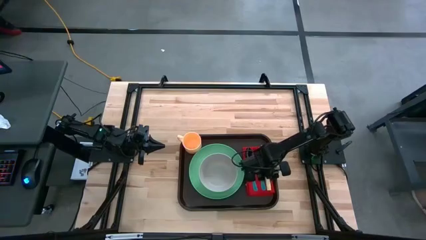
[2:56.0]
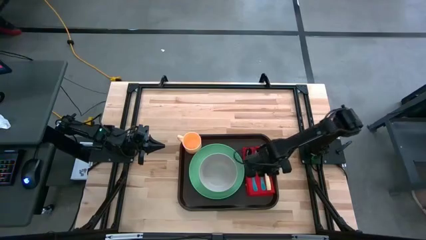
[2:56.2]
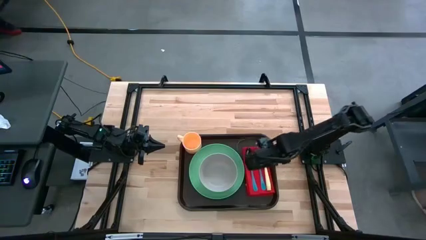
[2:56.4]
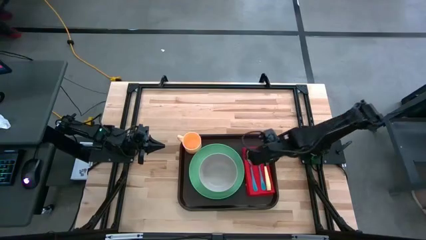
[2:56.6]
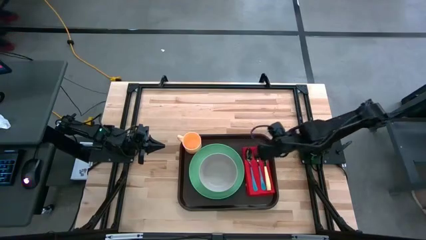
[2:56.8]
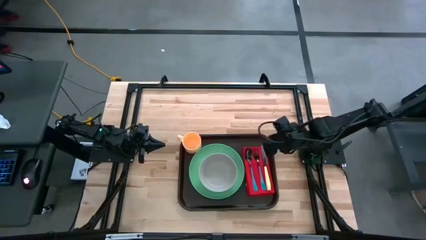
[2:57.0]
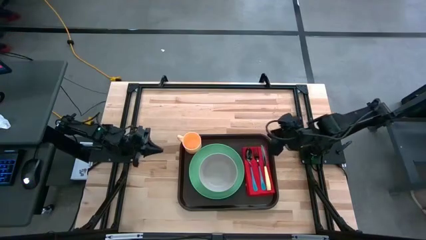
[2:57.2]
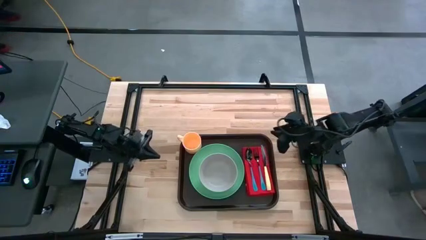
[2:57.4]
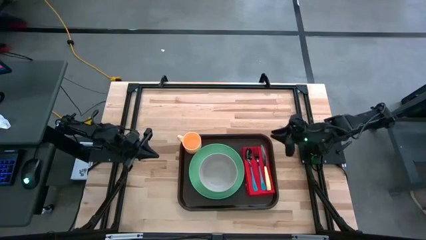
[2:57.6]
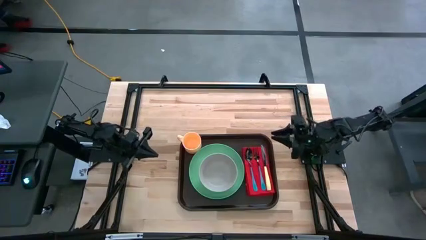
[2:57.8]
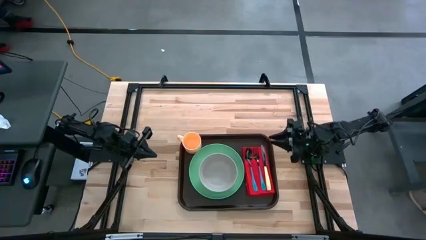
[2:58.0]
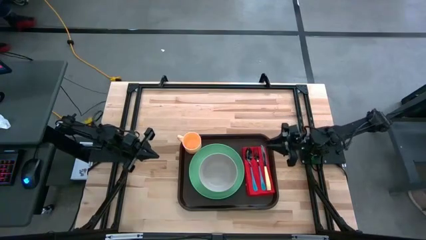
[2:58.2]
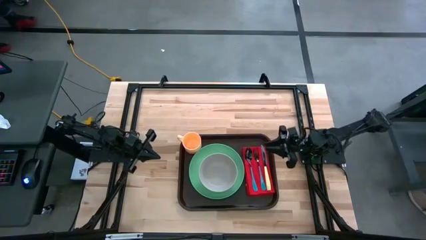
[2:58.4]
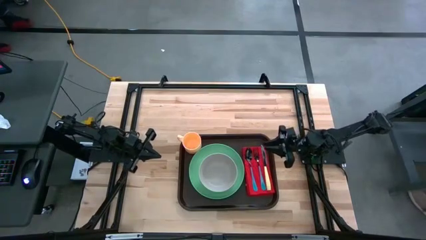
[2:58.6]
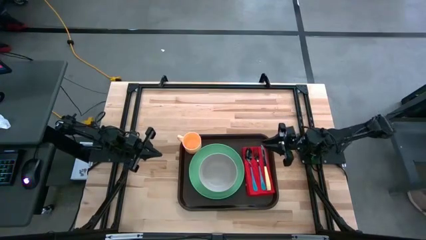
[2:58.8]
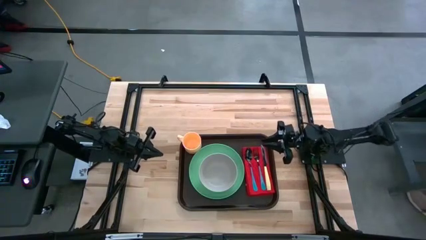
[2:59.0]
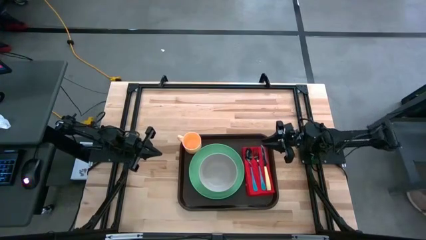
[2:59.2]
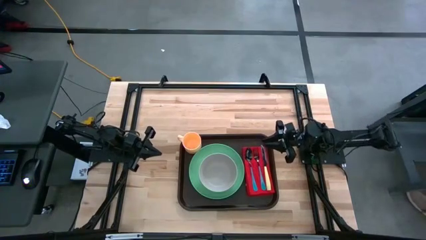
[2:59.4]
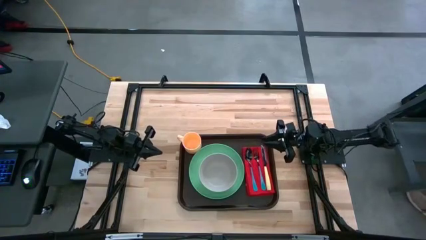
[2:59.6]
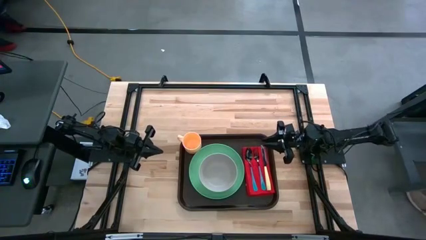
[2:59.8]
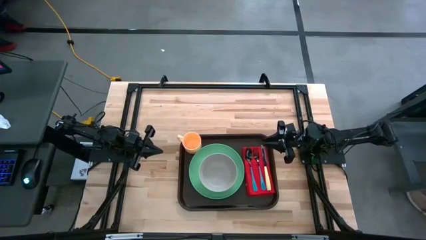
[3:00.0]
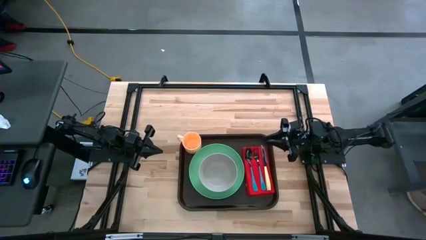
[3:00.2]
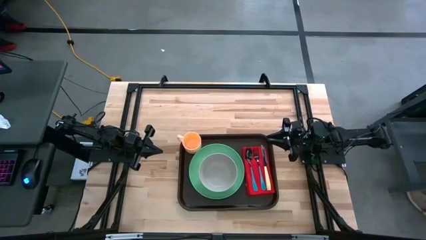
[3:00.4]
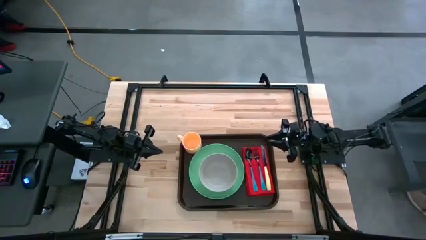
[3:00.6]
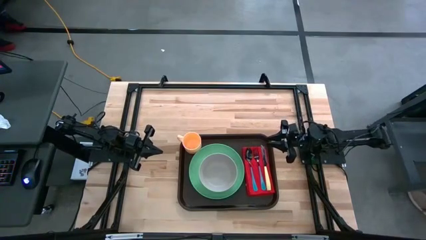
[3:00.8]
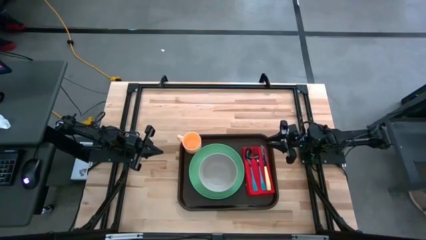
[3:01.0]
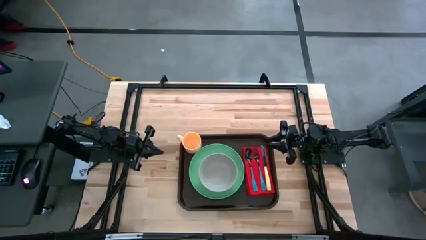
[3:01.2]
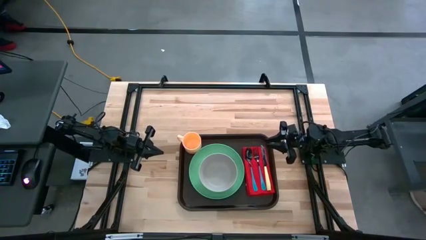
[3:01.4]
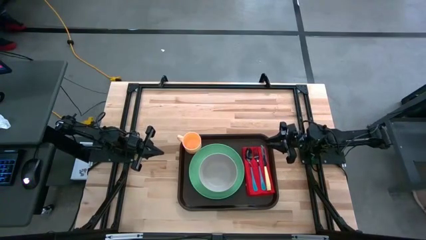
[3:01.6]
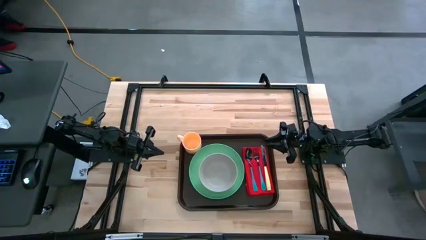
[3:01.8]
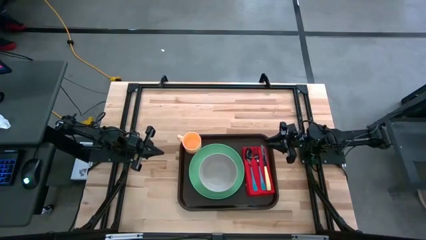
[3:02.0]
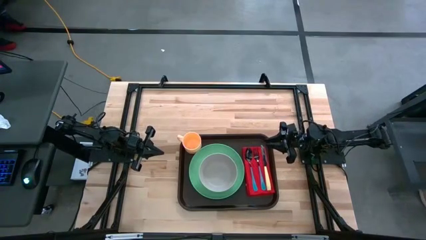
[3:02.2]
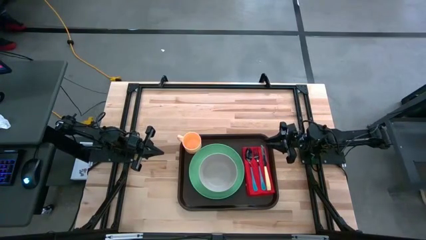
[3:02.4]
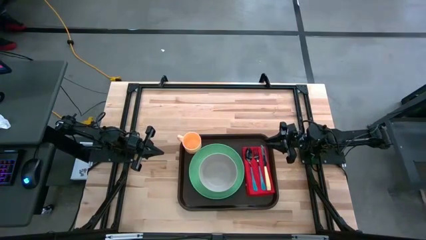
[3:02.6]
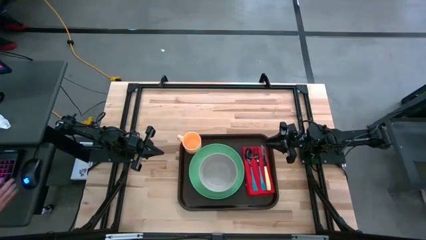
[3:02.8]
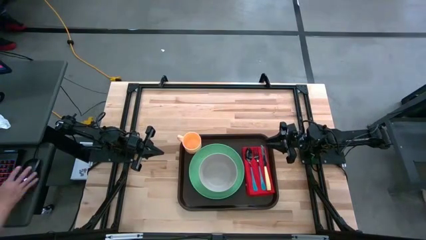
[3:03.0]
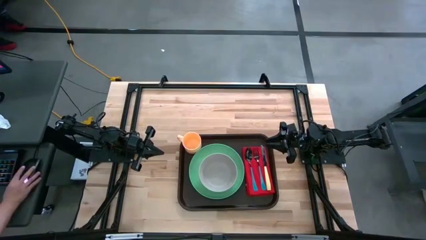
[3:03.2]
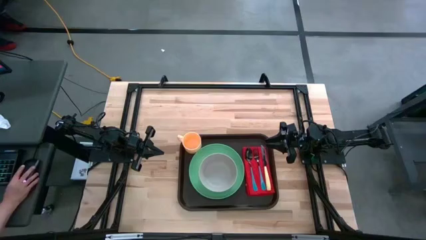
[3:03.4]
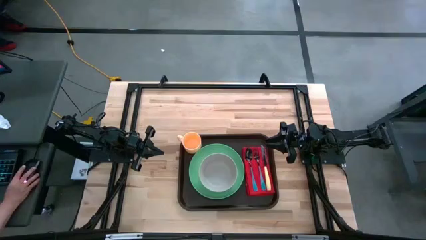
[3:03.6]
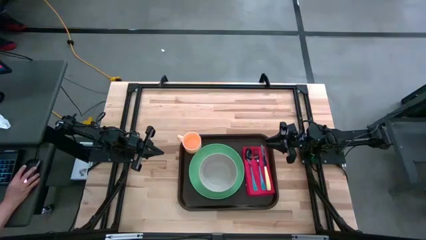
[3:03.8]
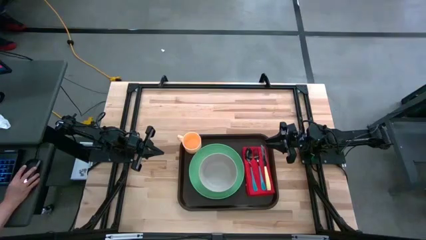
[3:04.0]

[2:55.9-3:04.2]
Task: Set up tray
Return to Home Position

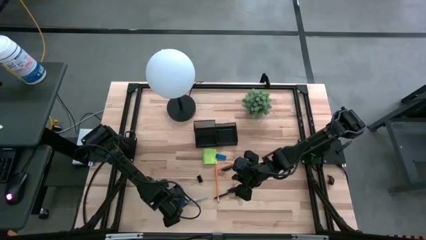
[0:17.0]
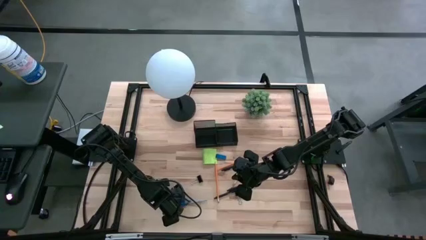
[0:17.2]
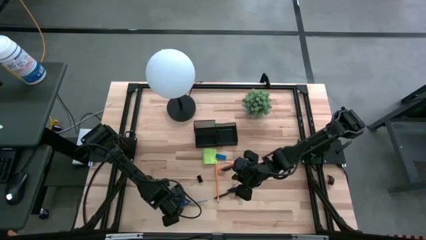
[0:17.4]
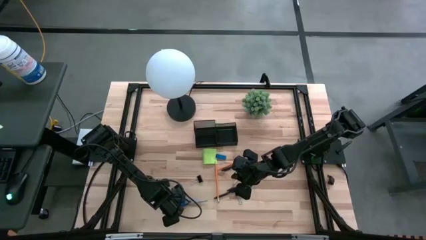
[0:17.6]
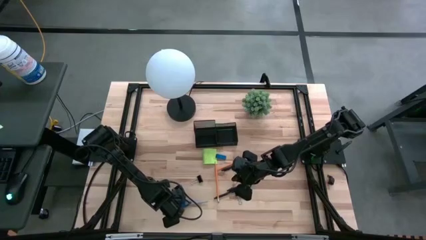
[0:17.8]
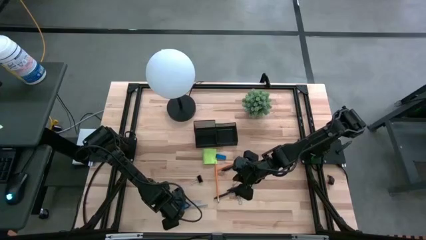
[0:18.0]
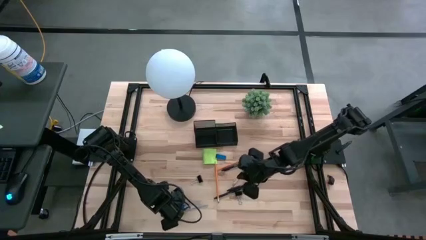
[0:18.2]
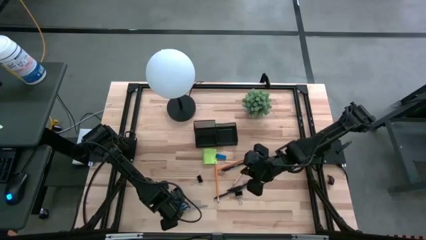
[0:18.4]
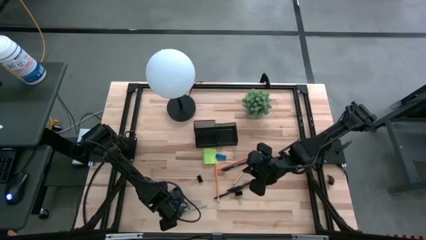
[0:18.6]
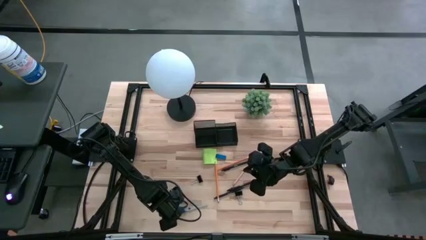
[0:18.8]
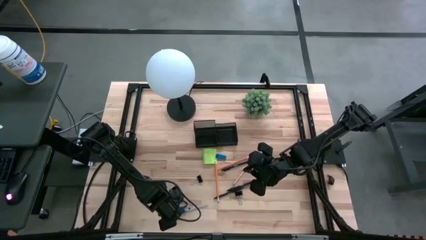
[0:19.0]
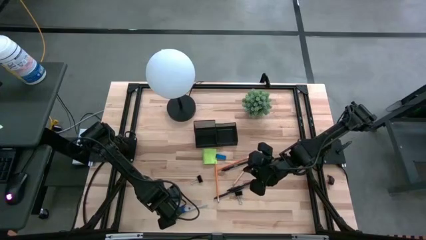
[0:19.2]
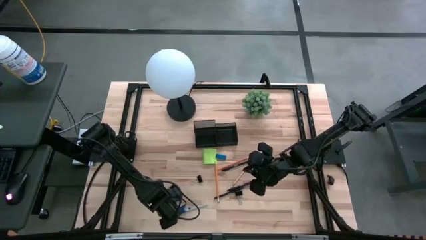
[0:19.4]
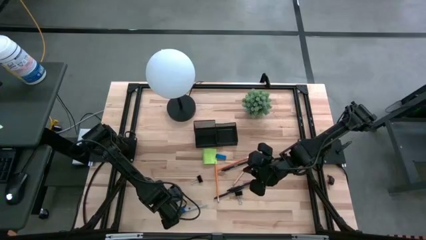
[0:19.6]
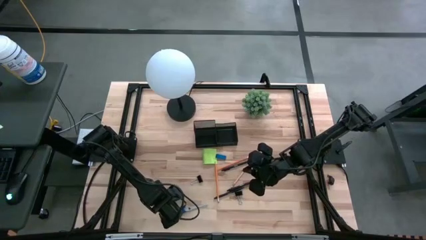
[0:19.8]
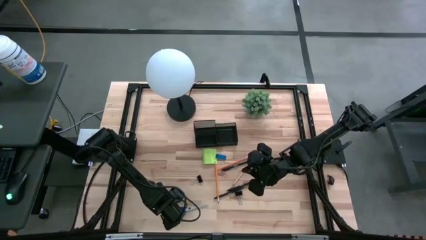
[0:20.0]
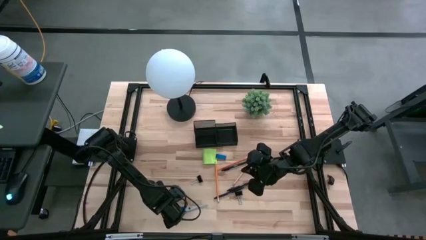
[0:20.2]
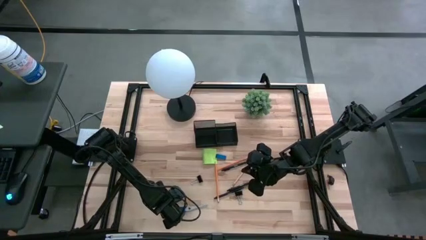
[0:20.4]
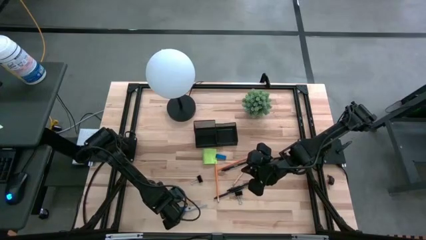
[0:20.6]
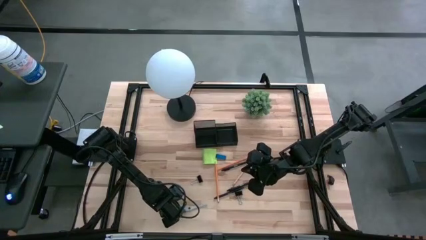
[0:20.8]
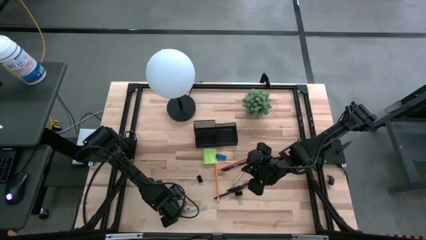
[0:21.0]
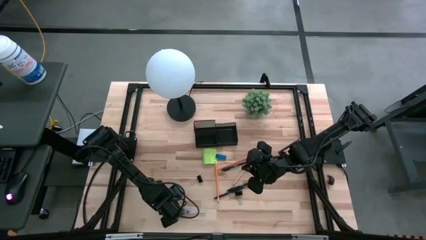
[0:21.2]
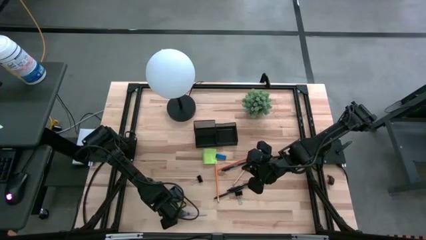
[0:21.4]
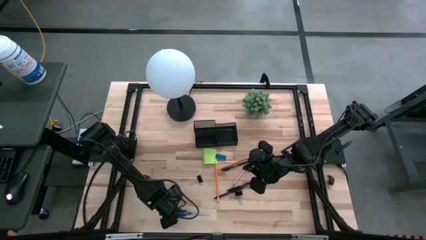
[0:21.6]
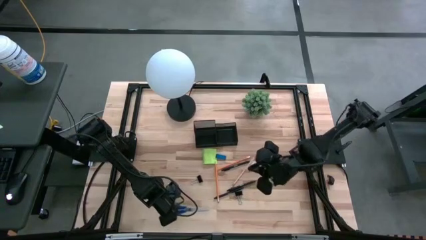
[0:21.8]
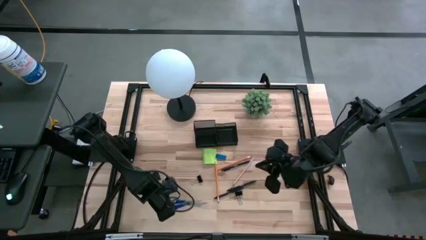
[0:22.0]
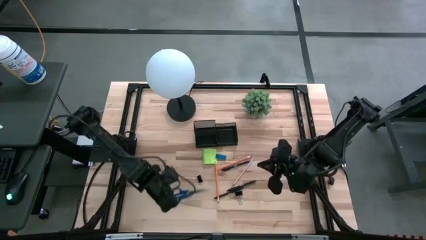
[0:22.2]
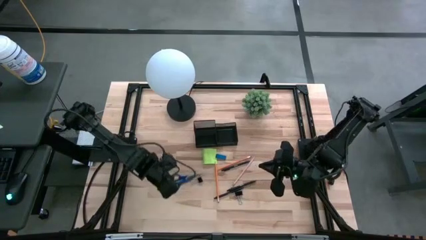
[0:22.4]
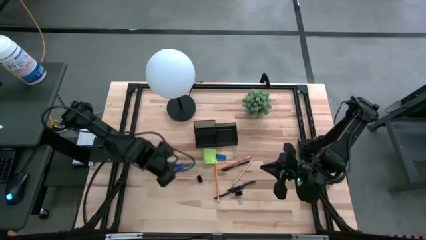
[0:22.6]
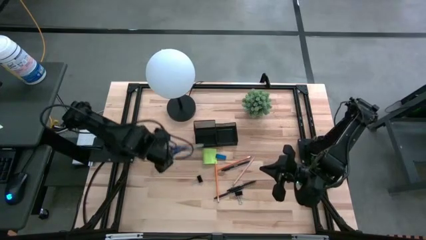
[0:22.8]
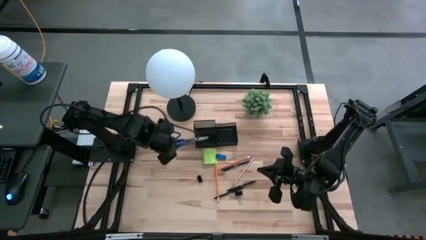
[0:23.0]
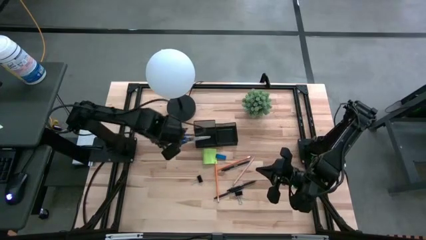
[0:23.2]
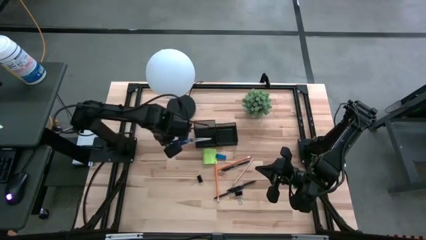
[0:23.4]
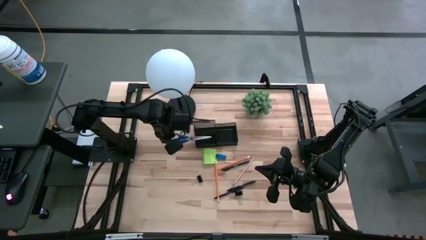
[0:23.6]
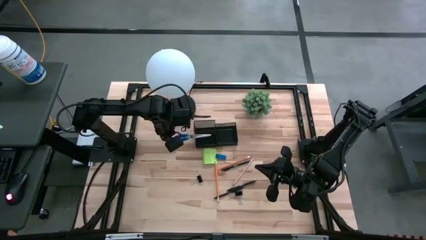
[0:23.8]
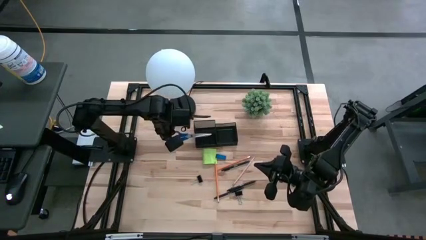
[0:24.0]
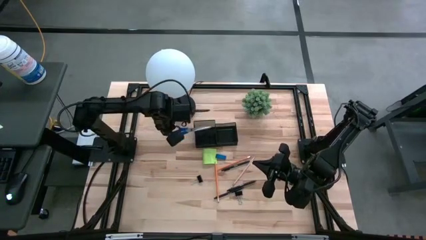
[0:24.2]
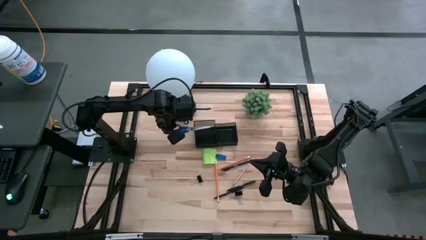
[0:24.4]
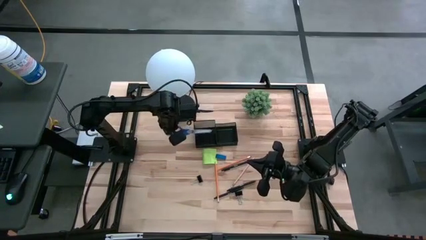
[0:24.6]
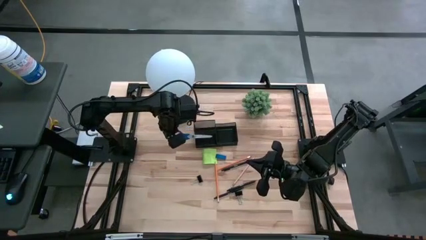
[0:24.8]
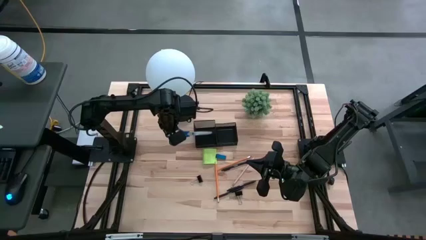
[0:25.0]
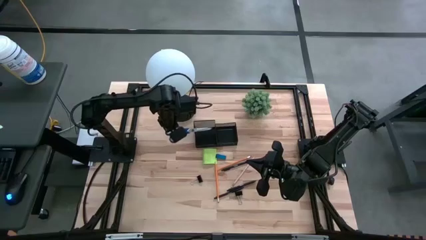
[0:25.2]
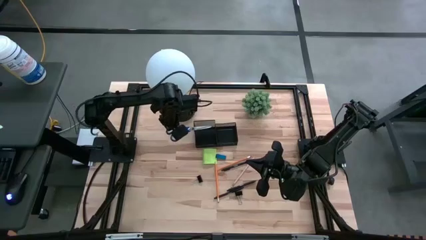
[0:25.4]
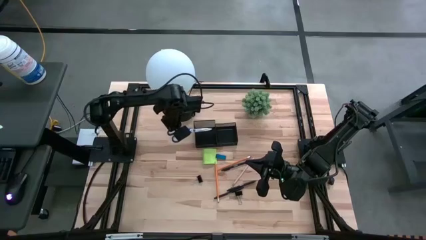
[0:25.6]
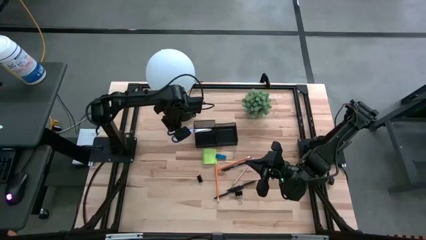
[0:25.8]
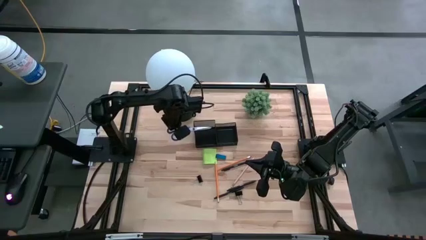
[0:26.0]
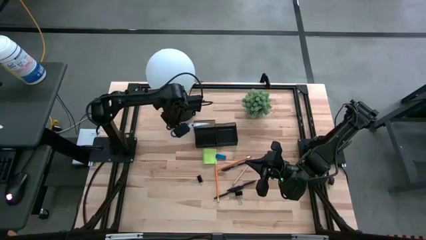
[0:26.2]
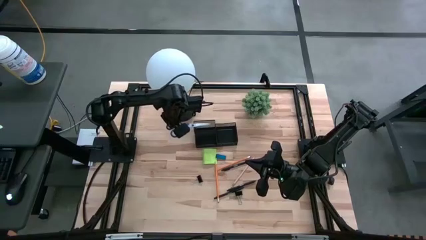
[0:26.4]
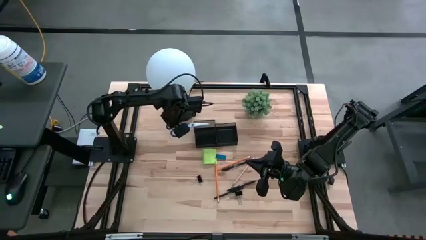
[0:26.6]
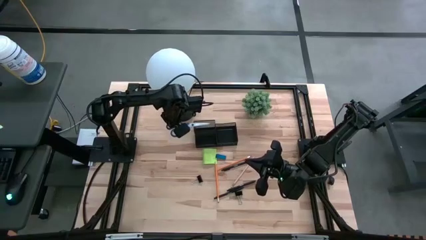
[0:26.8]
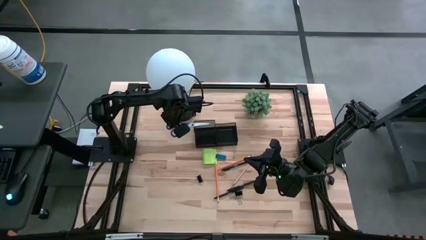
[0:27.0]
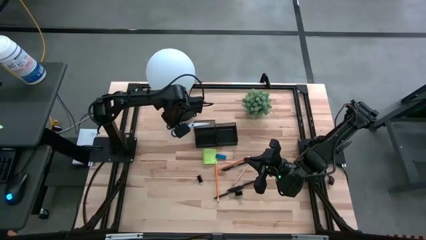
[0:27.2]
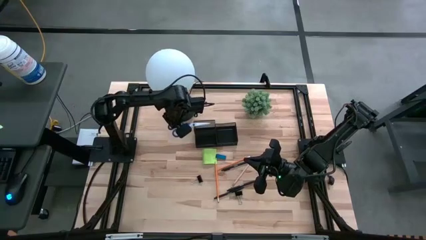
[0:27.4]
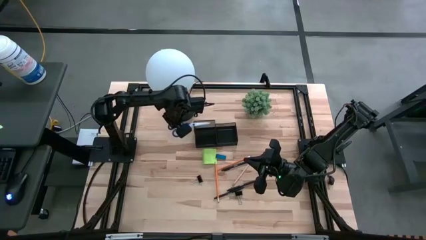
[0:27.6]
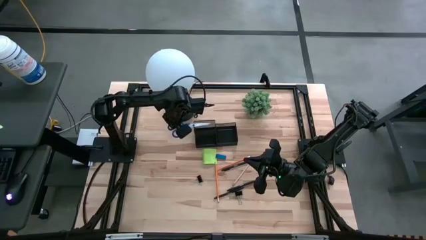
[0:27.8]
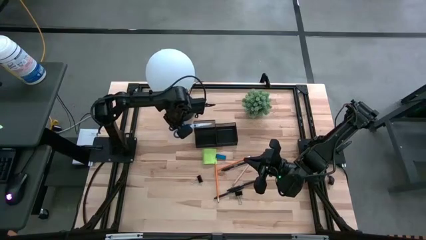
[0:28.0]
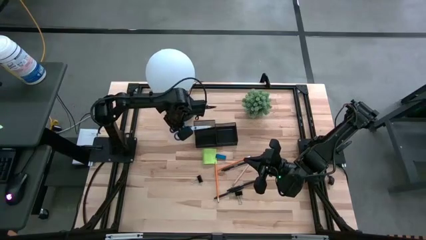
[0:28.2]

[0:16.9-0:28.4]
Task: Pick and place office supplies into organizer
Put the blue scissors into the top left side of the desk organizer
